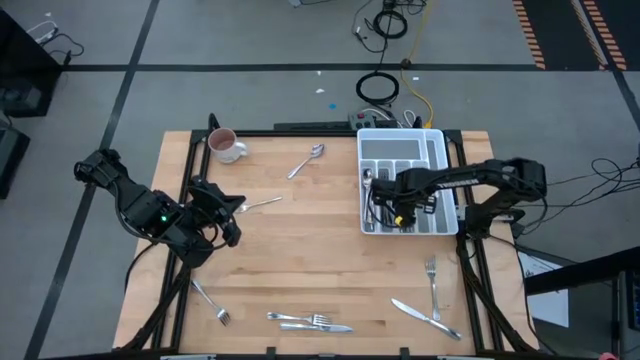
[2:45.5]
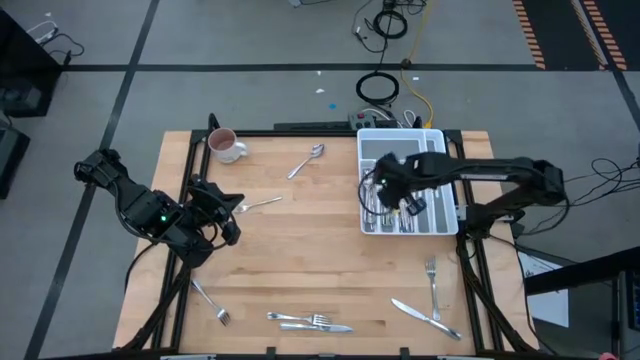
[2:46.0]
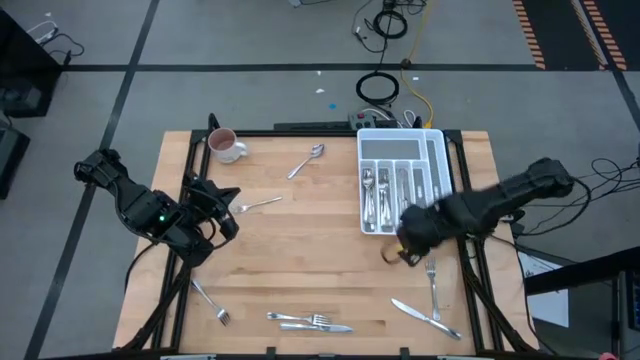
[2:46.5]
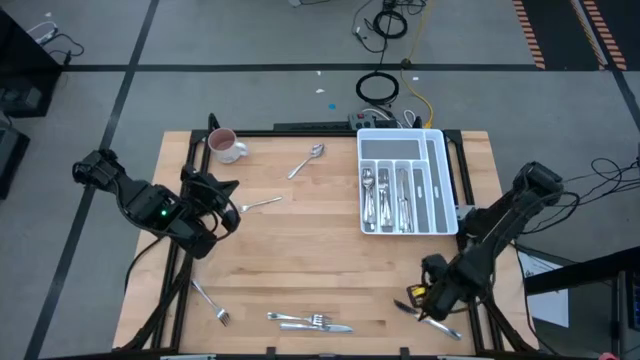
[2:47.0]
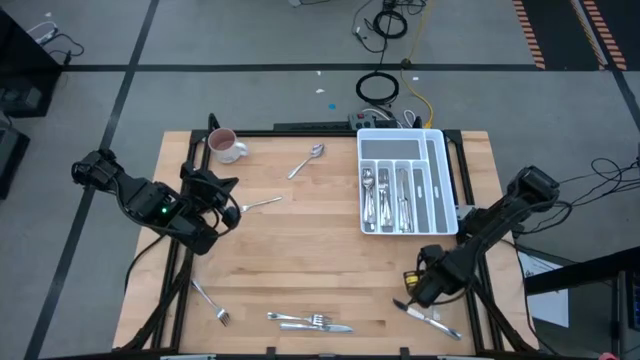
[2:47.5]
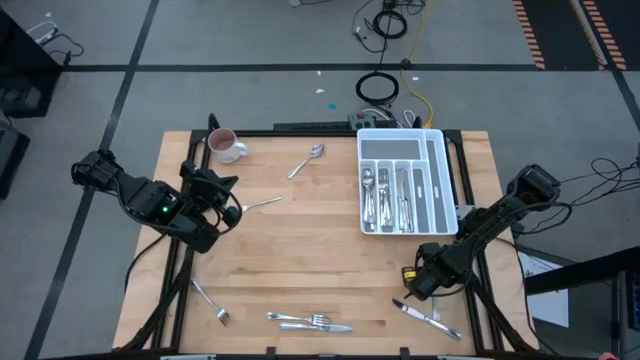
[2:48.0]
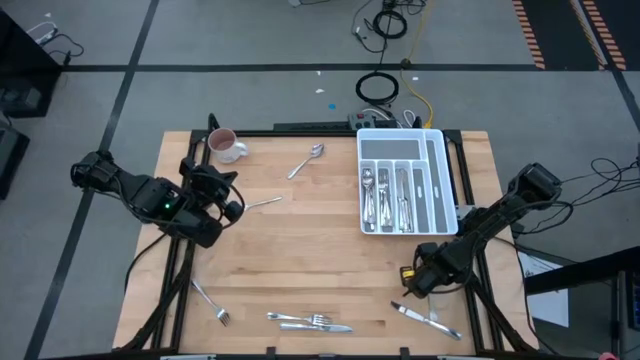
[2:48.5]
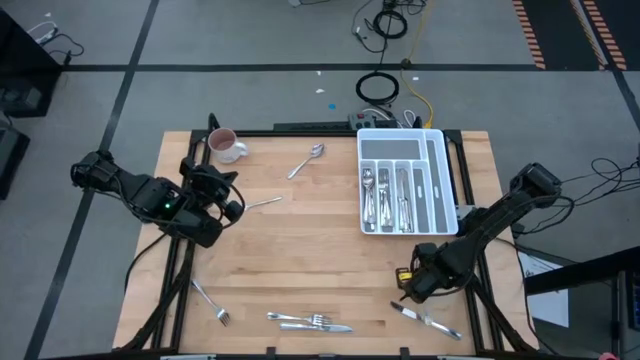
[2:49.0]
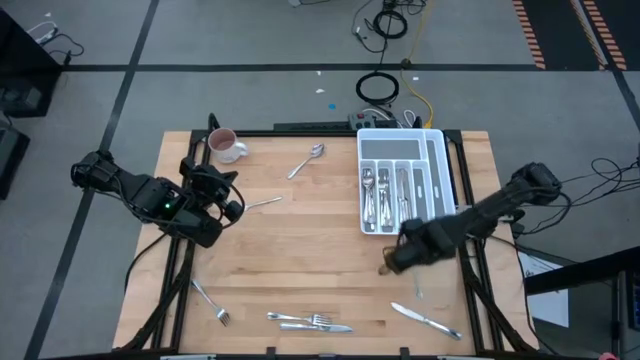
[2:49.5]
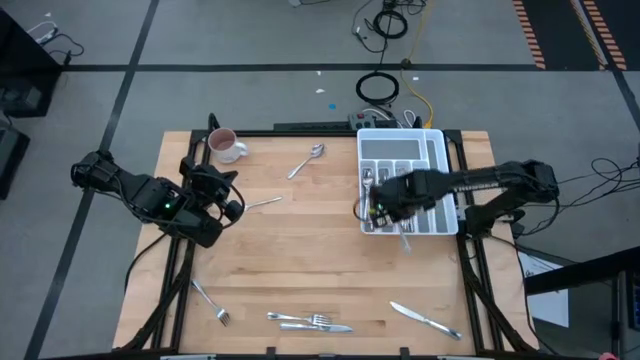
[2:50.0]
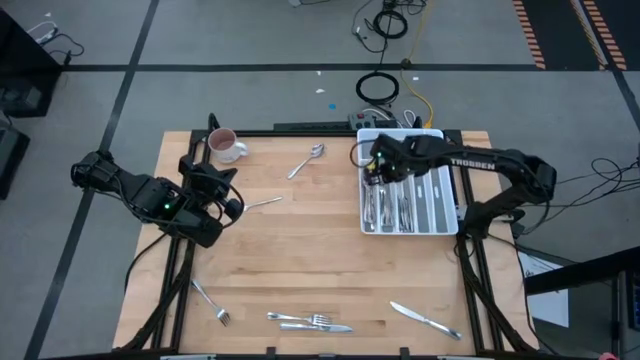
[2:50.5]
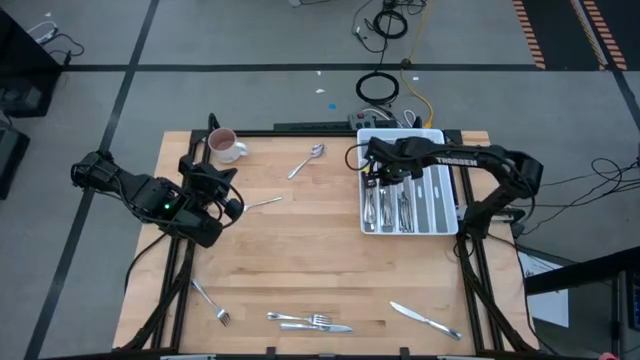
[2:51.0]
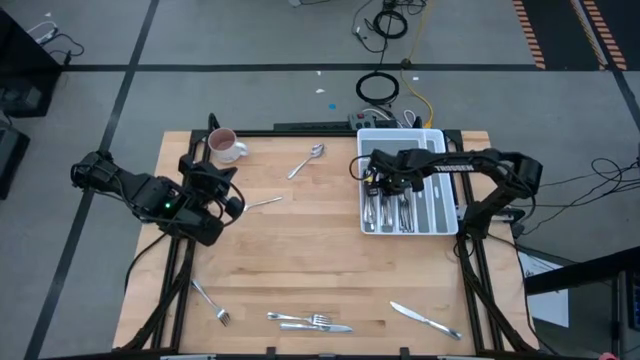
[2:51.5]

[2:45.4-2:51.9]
Task: Sort silverware
Put the silver fork into the silverware tray

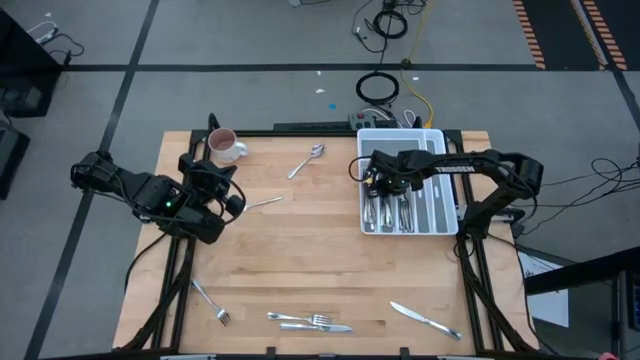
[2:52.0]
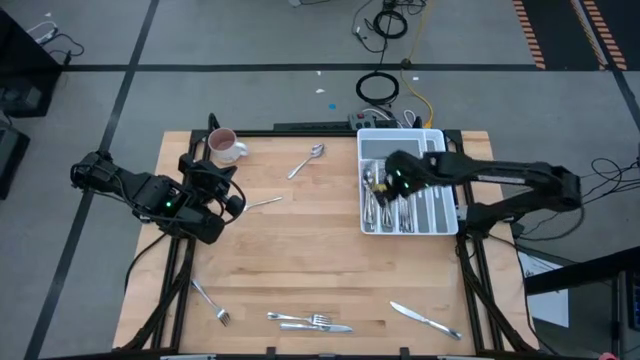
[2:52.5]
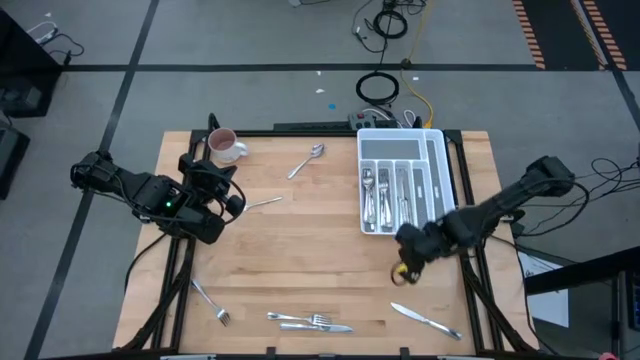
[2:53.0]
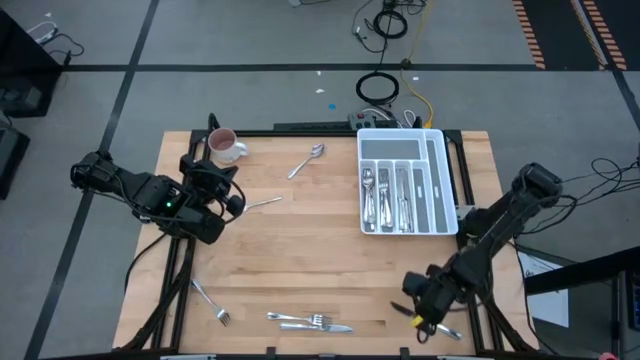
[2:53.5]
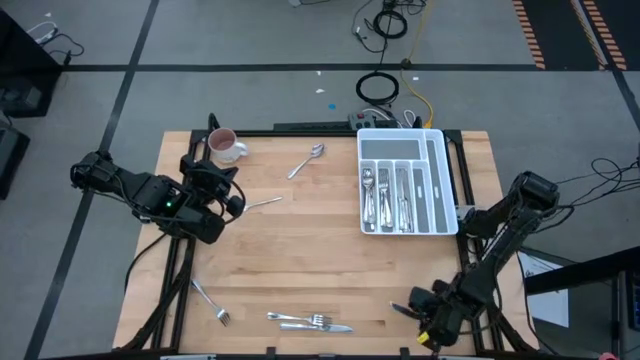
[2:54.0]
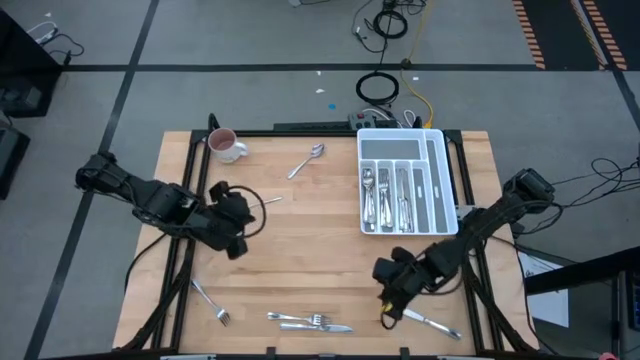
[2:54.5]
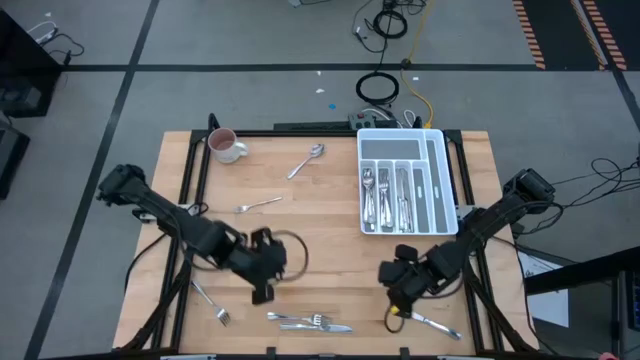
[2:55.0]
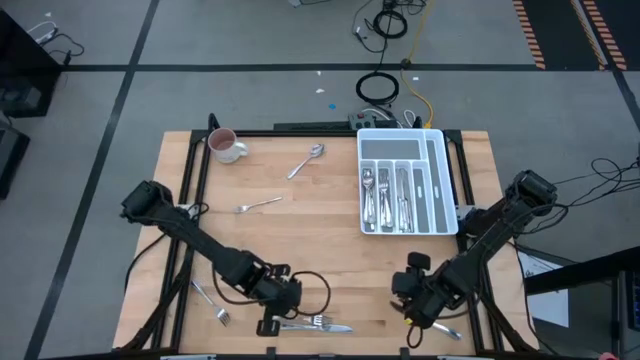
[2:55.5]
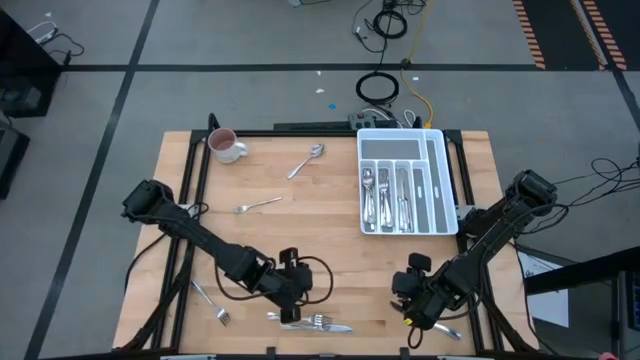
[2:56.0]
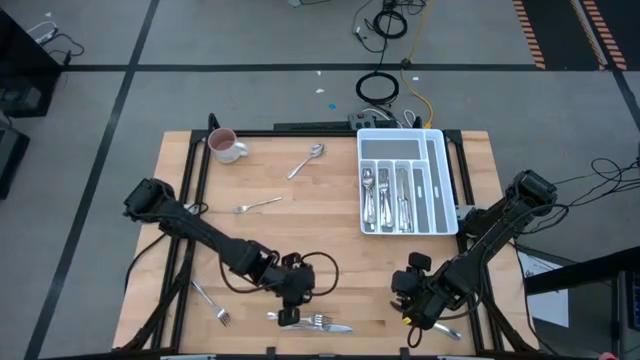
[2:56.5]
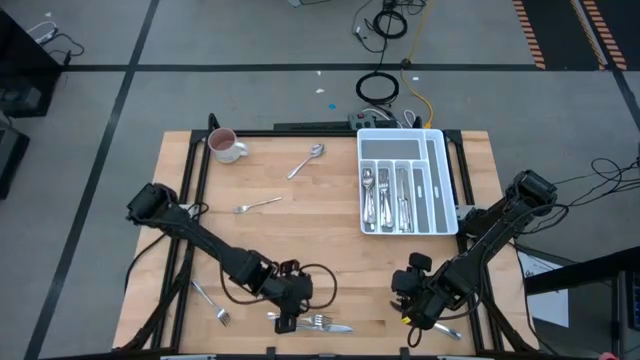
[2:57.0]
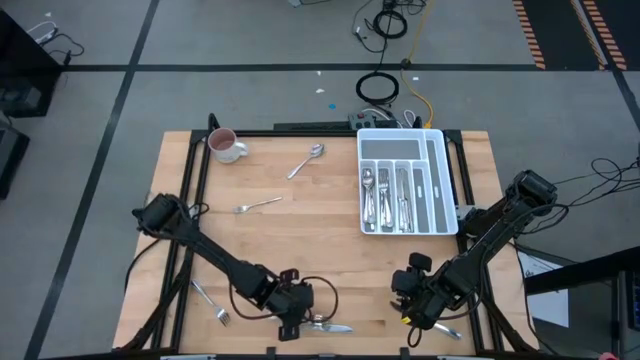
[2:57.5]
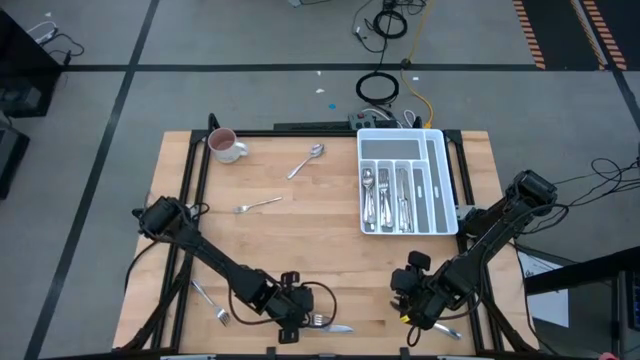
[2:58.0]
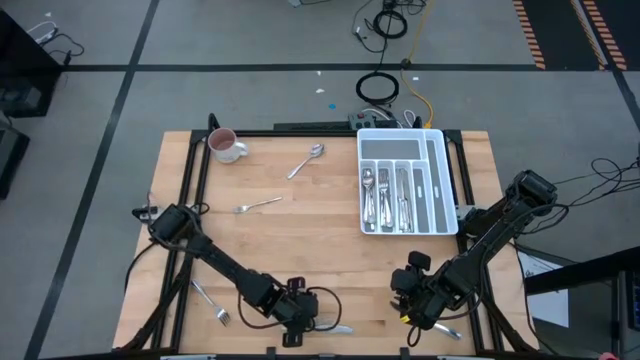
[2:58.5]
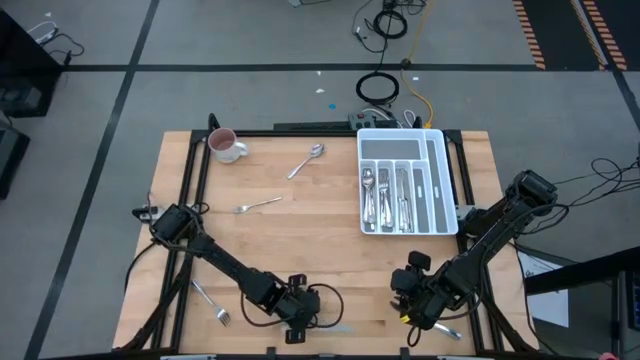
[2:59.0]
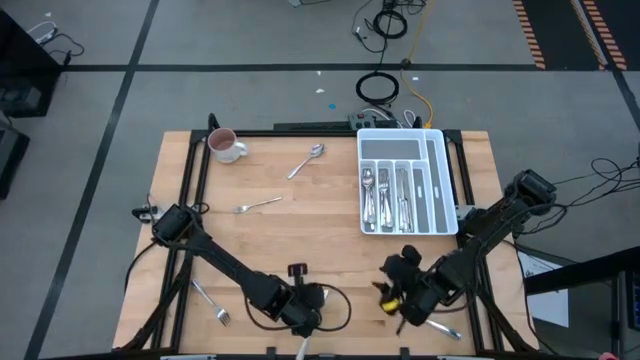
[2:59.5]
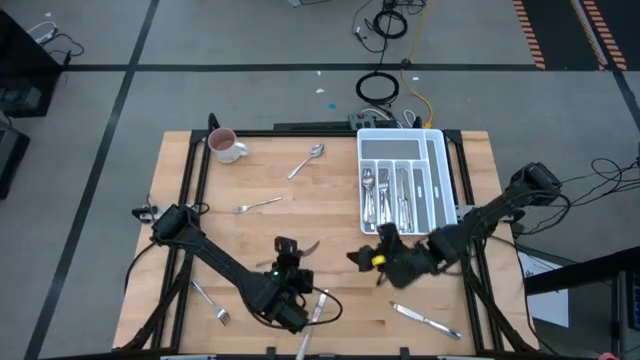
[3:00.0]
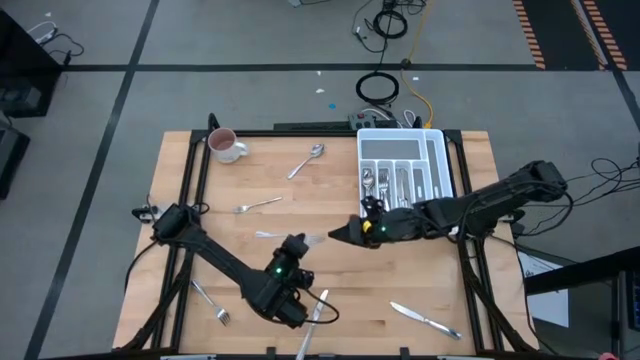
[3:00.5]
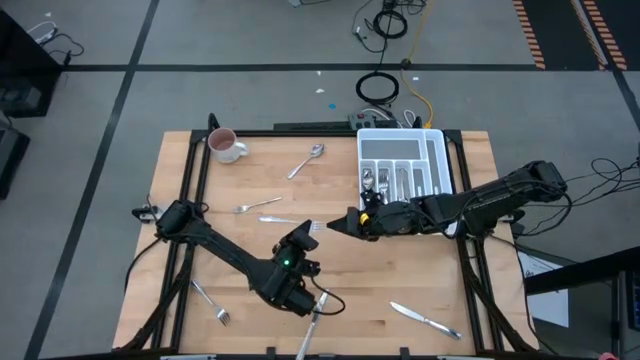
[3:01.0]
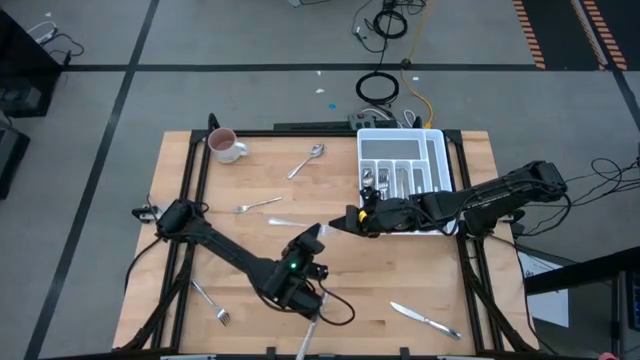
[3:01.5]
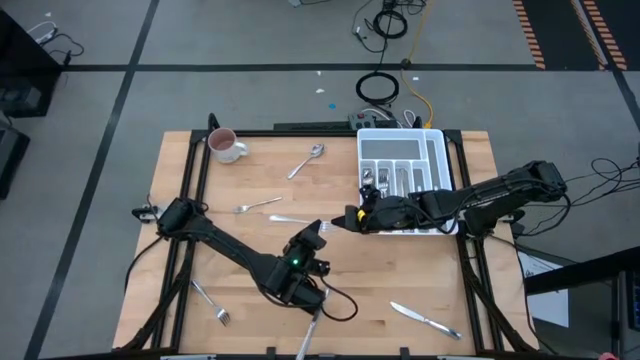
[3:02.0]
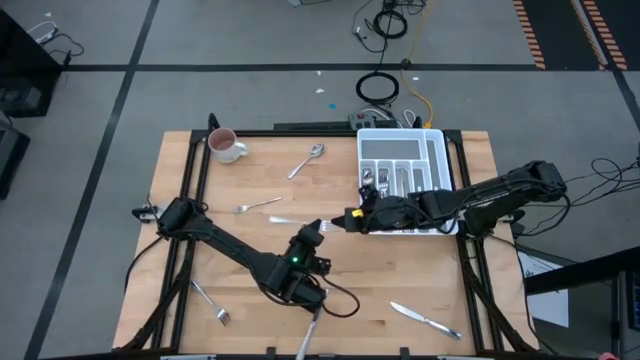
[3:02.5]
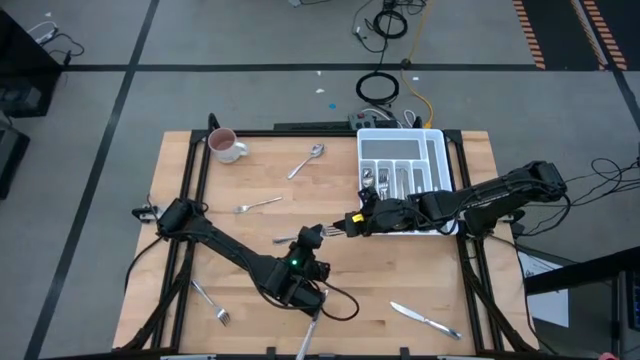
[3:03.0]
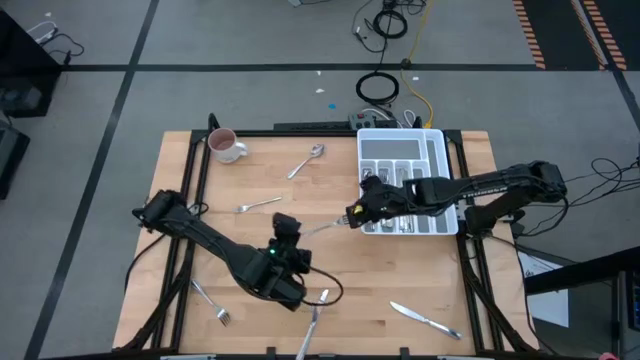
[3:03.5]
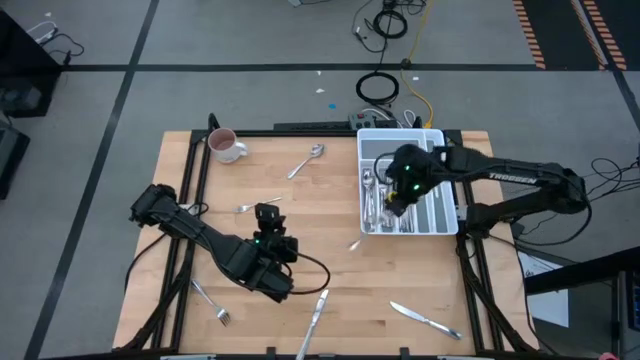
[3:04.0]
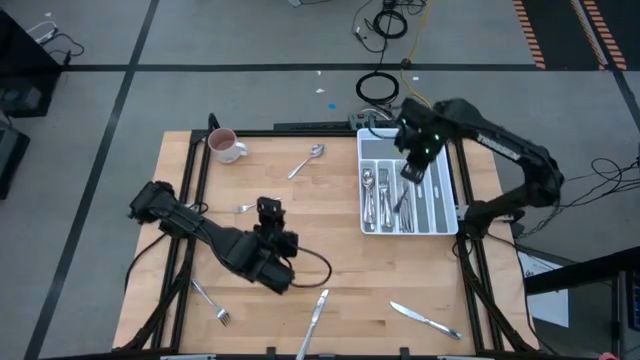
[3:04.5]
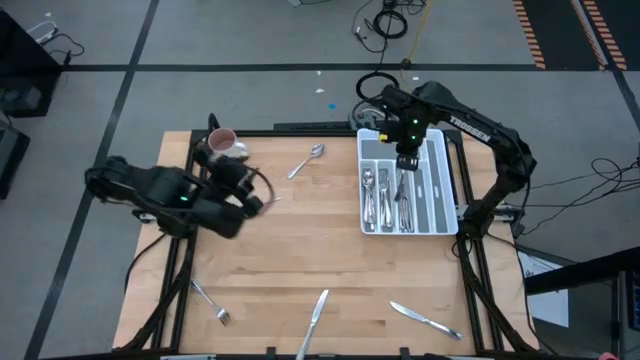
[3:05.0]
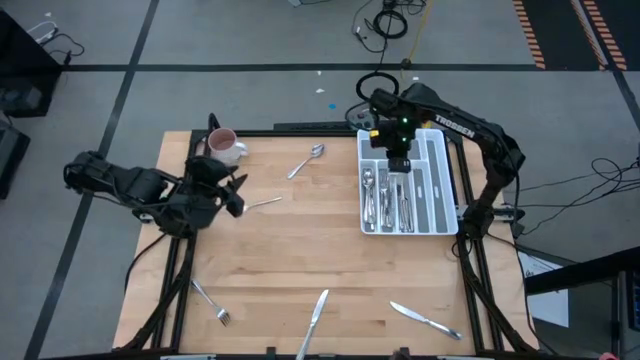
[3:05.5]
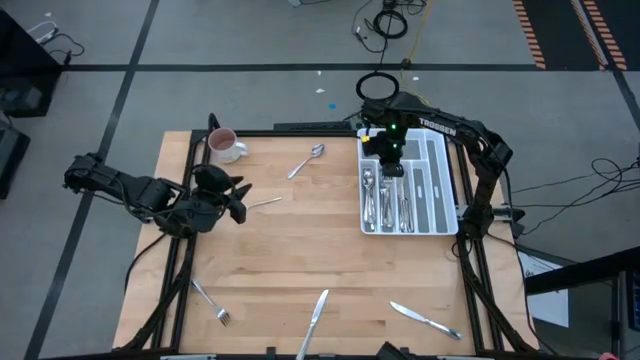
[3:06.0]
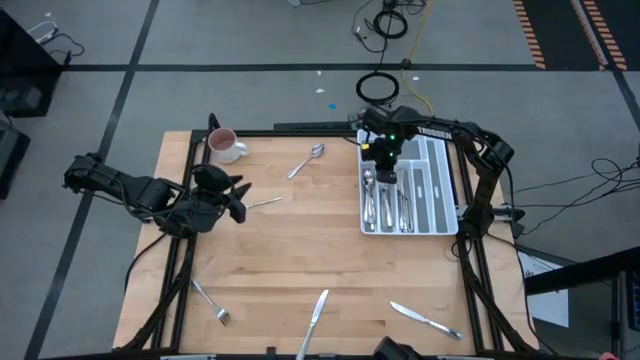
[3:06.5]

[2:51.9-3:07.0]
Put the silver fork into the silverware tray
